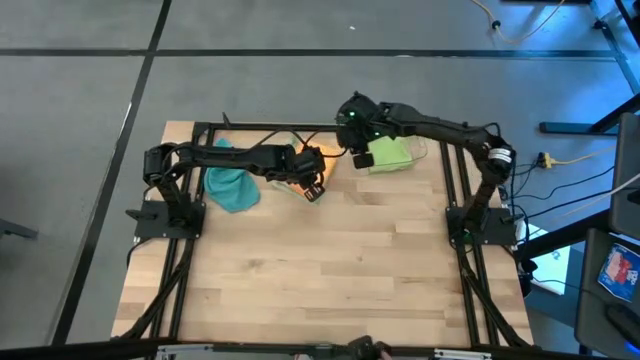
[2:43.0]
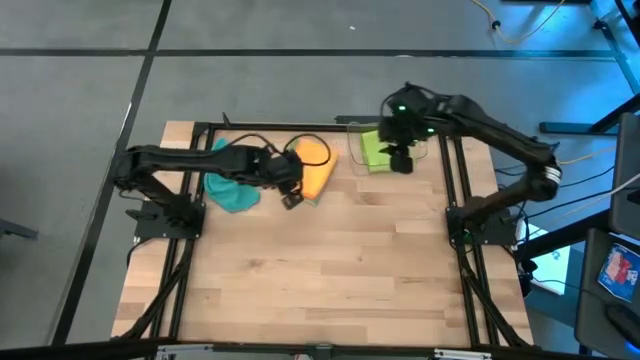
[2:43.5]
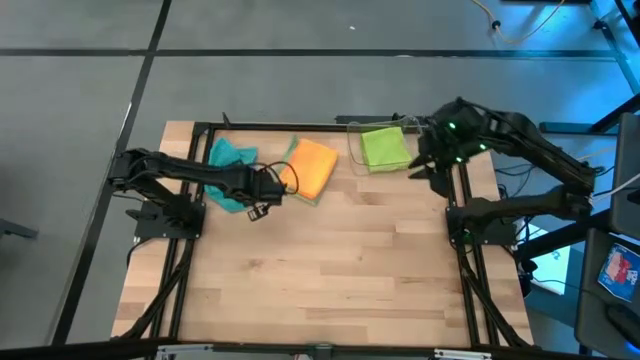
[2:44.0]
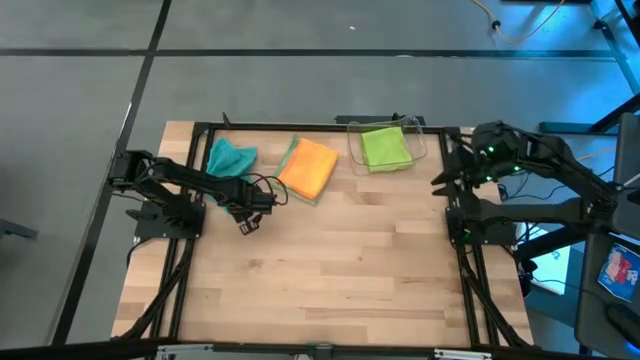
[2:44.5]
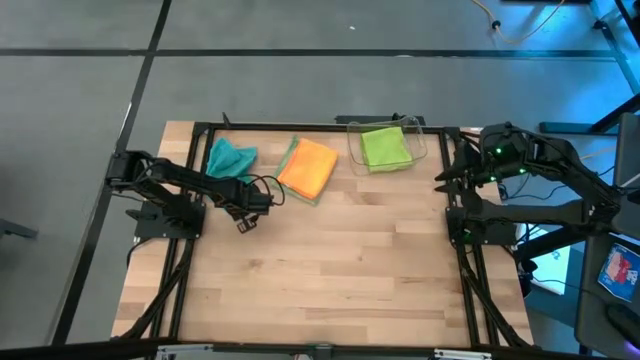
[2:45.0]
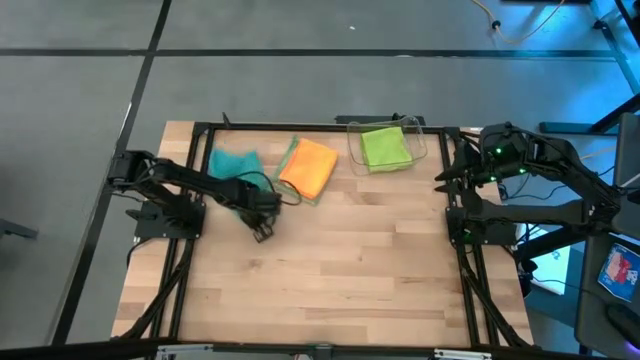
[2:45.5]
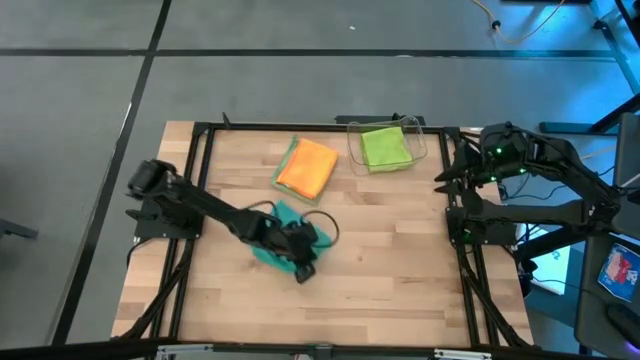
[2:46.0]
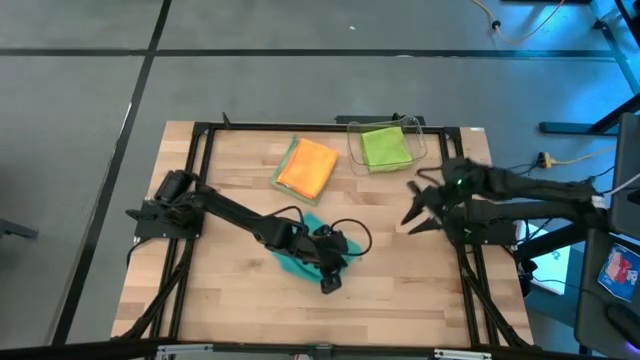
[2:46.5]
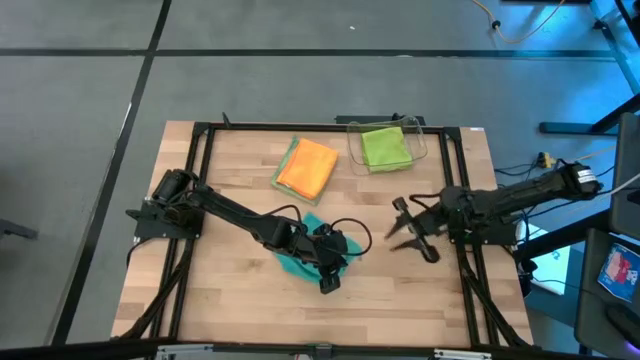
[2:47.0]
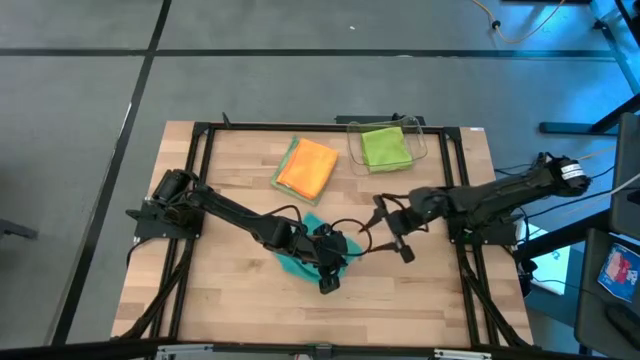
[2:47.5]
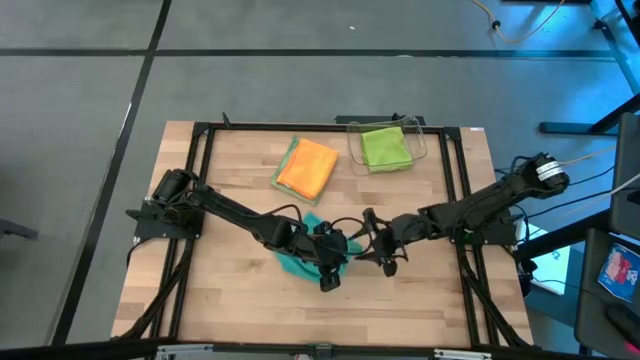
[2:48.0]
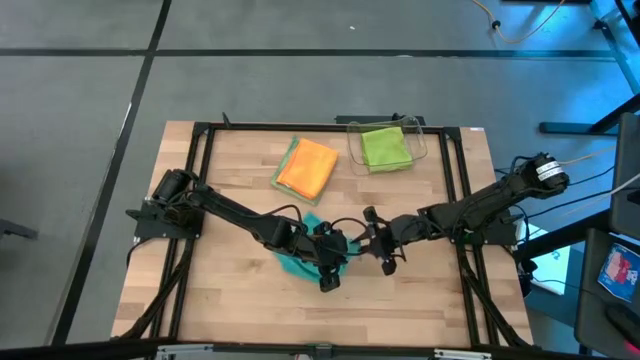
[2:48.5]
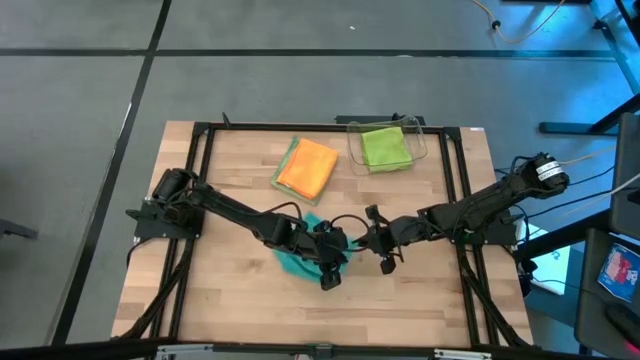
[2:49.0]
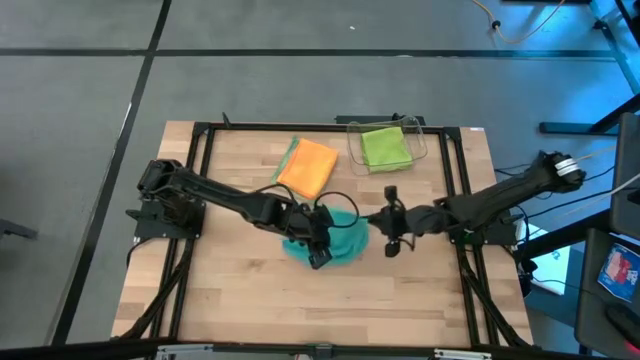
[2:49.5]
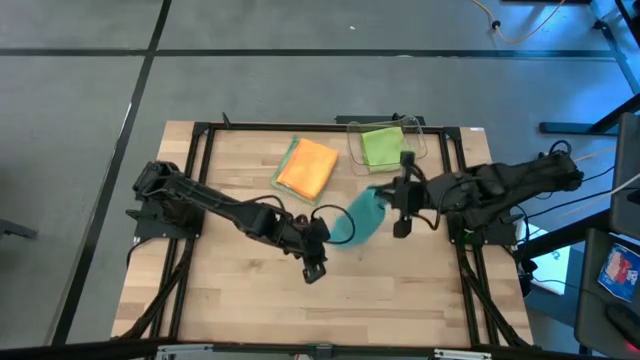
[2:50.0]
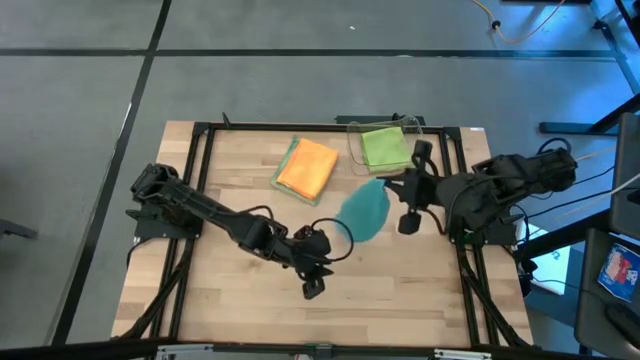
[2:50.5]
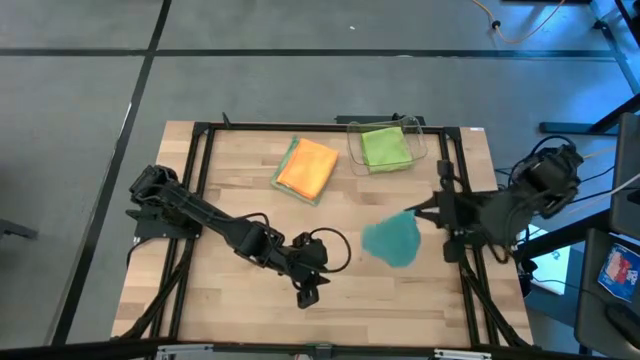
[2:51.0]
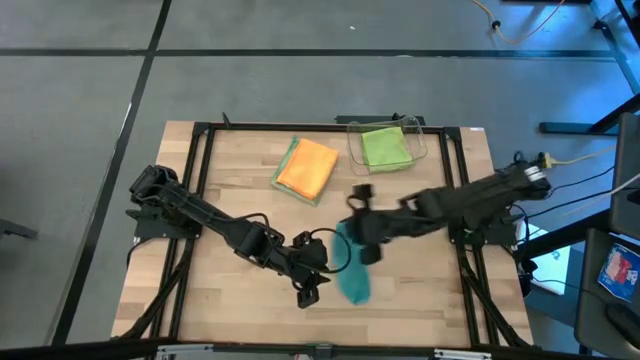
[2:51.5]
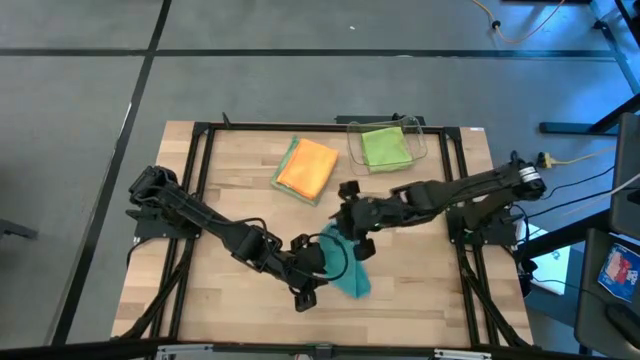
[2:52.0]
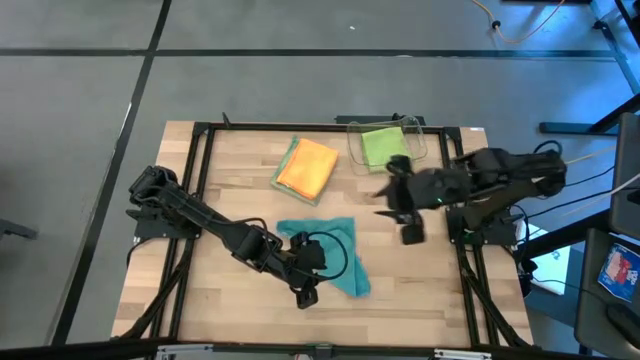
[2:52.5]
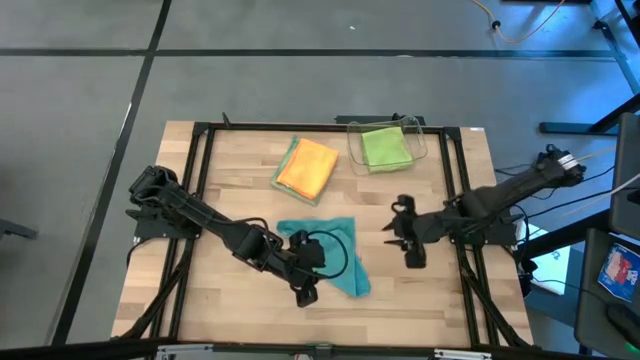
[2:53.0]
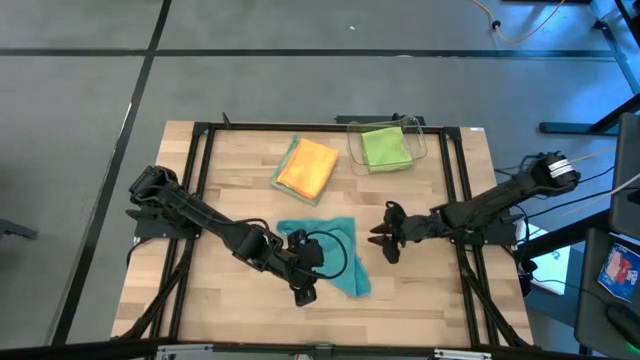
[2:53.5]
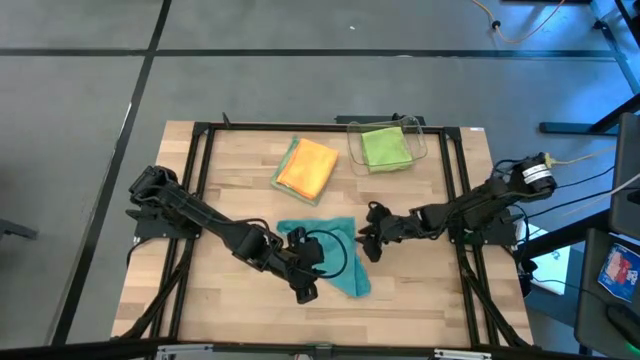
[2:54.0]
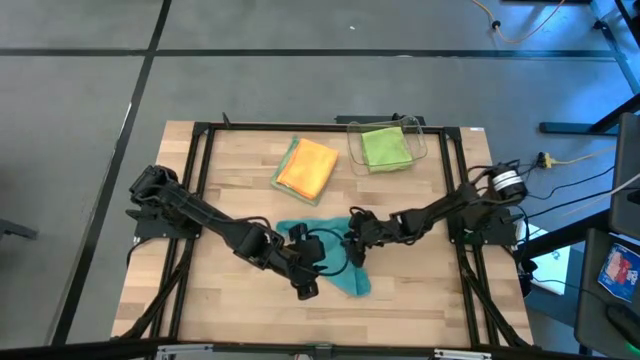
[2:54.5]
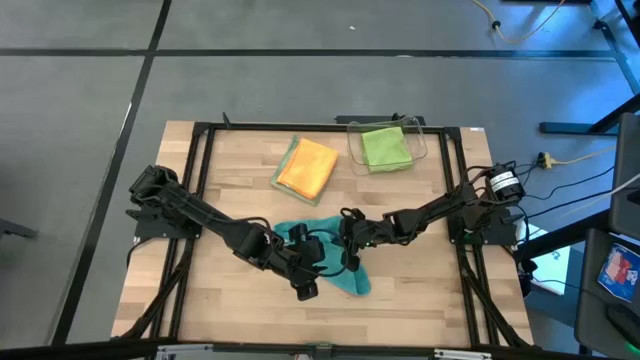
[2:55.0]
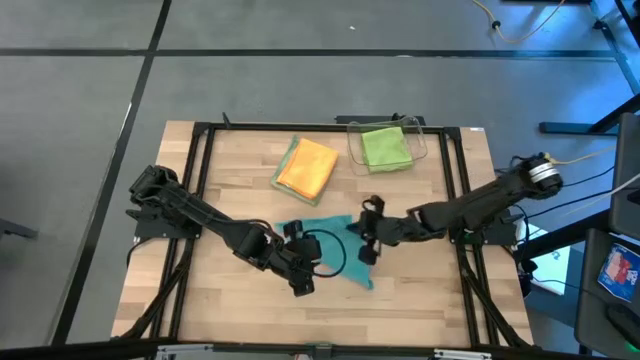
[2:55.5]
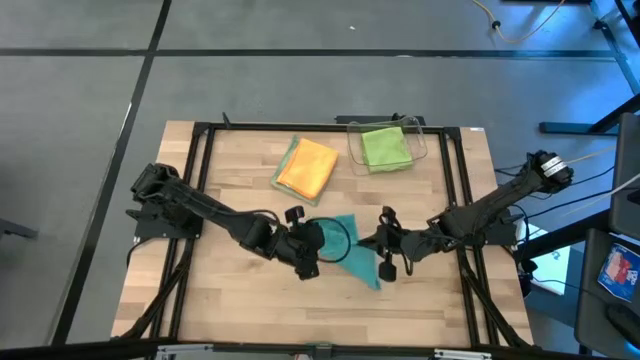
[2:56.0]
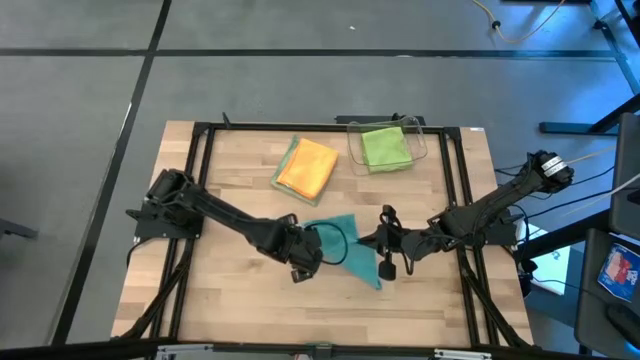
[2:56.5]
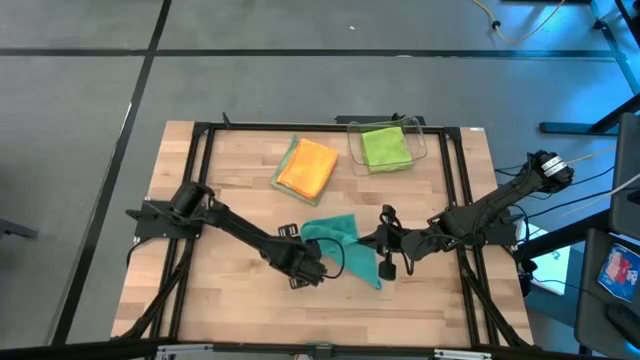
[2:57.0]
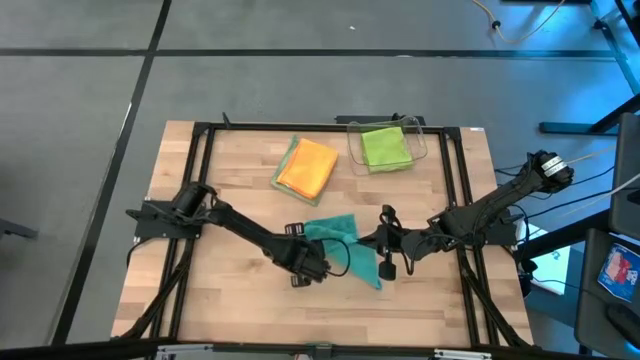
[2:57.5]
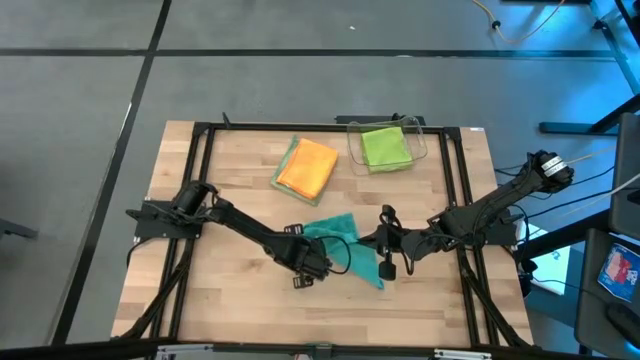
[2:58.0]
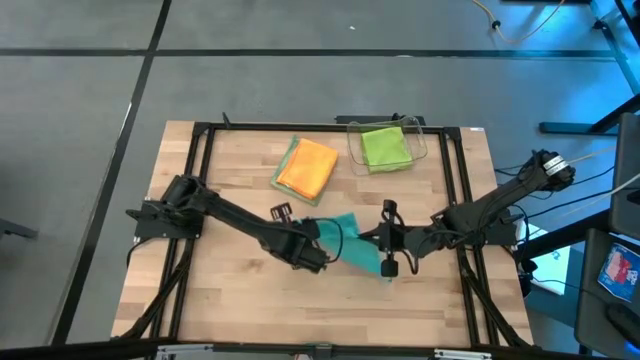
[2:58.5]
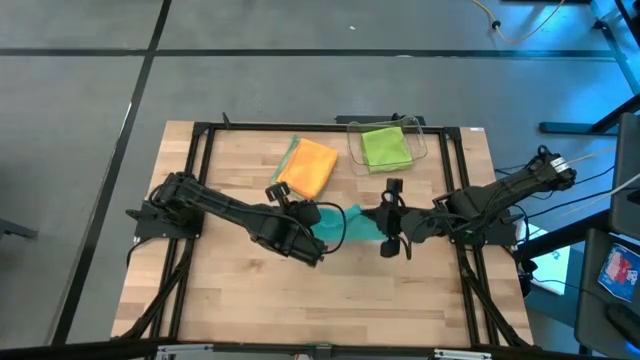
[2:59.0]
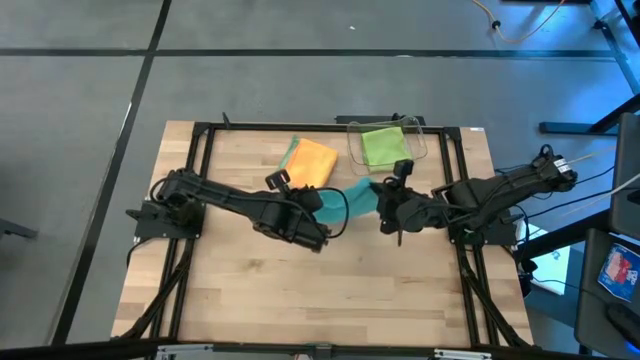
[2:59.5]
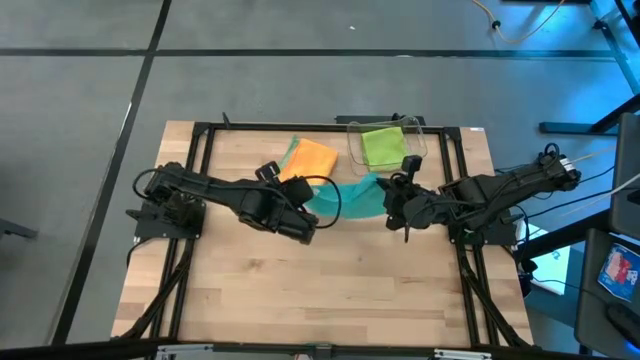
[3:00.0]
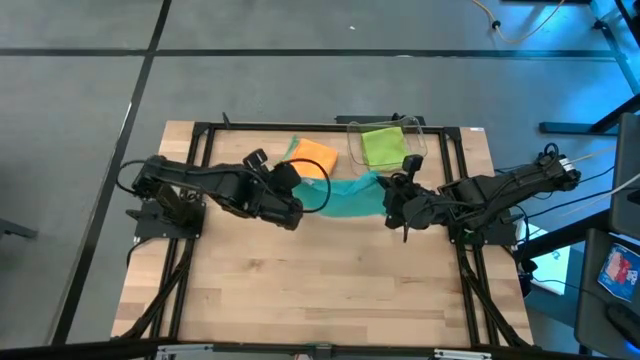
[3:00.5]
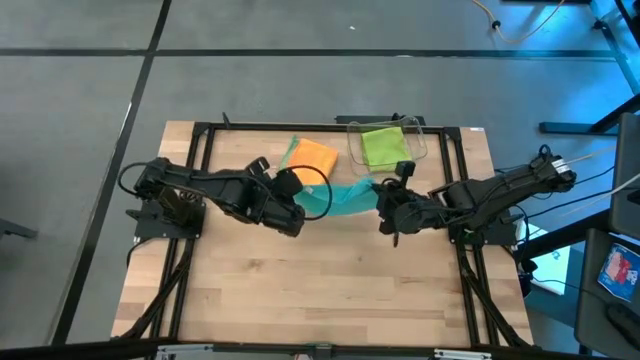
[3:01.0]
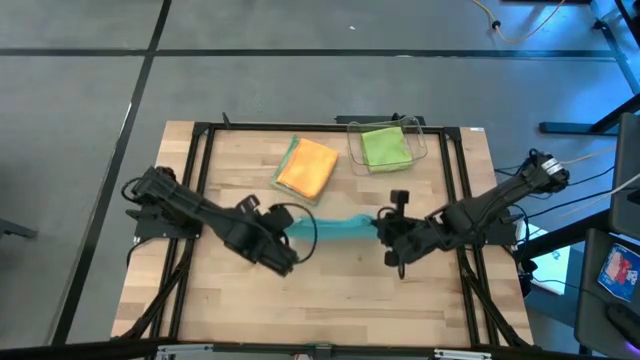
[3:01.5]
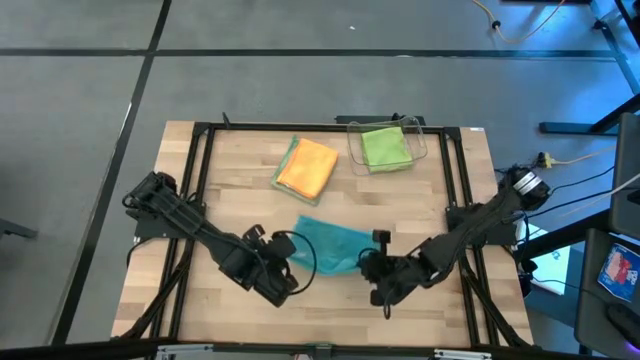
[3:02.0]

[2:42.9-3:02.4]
Task: Fold microfiber towels
Fold the blue microfiber towel
